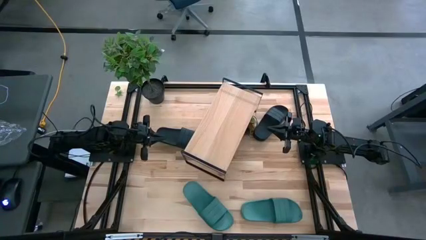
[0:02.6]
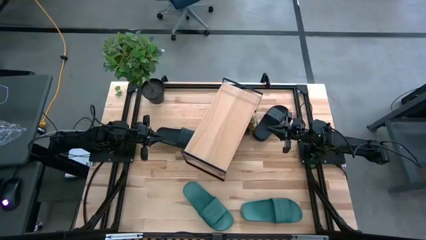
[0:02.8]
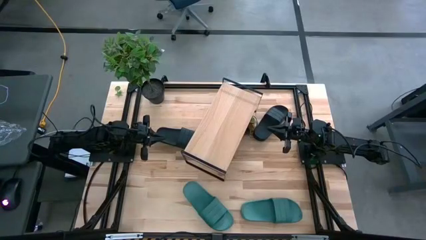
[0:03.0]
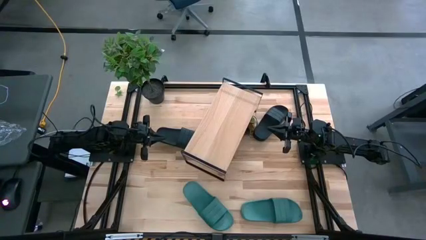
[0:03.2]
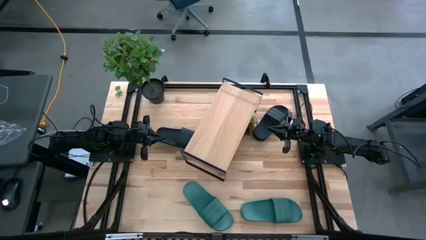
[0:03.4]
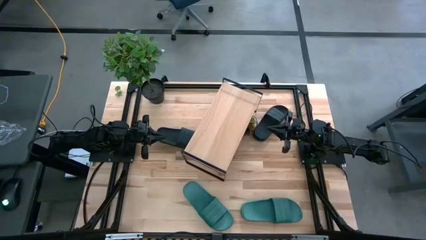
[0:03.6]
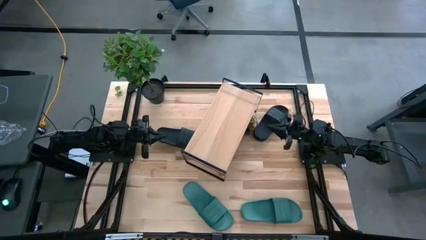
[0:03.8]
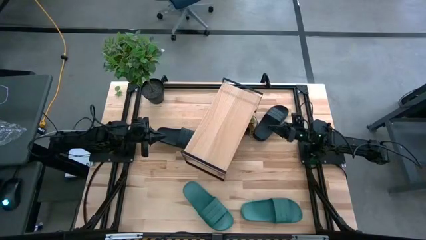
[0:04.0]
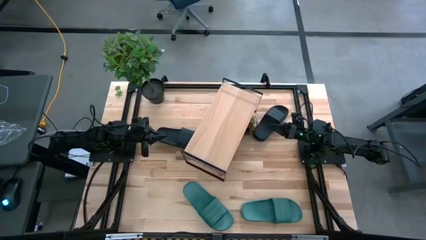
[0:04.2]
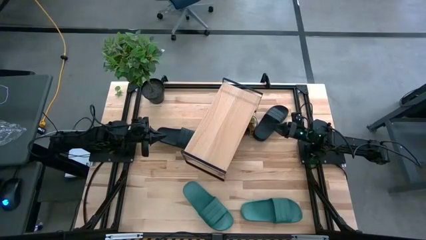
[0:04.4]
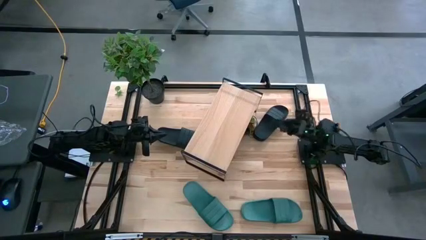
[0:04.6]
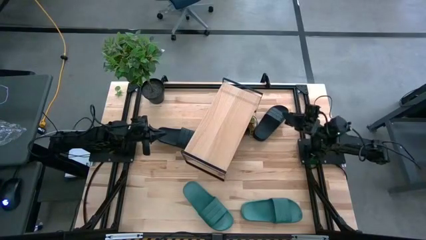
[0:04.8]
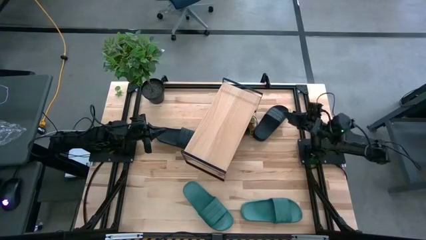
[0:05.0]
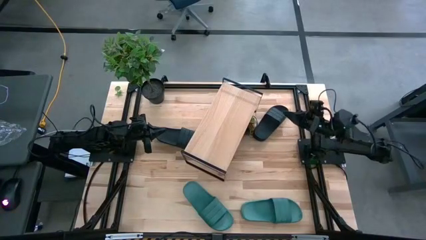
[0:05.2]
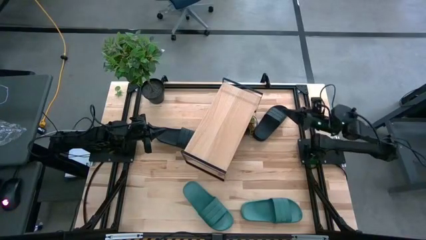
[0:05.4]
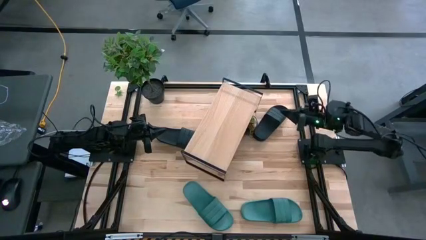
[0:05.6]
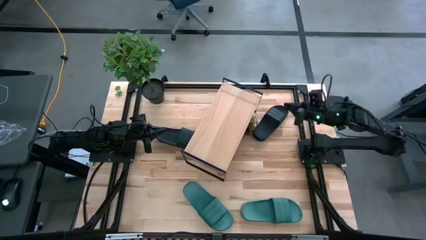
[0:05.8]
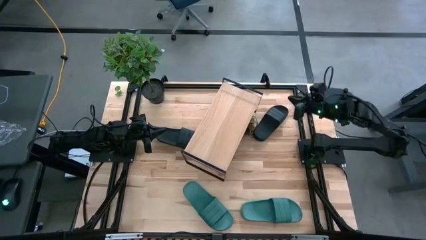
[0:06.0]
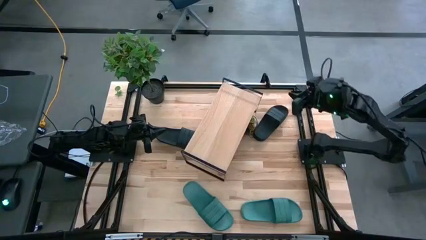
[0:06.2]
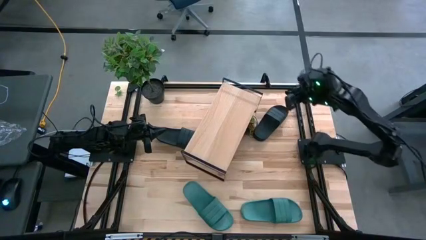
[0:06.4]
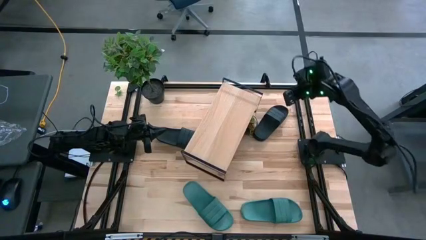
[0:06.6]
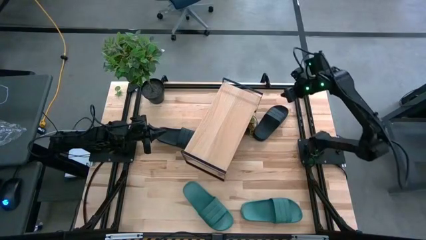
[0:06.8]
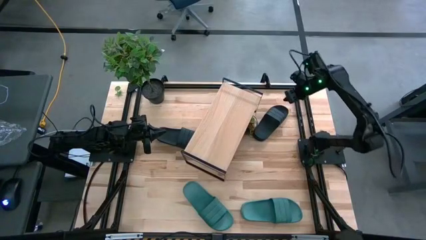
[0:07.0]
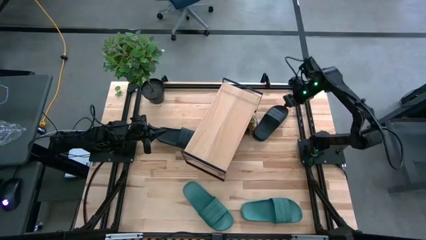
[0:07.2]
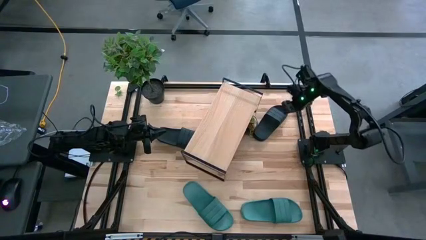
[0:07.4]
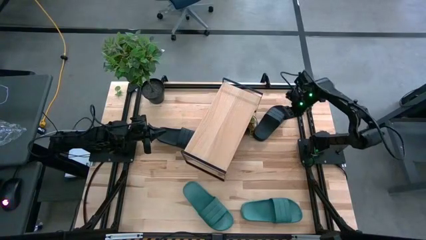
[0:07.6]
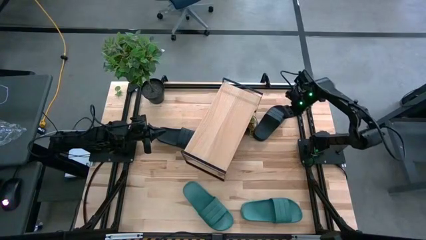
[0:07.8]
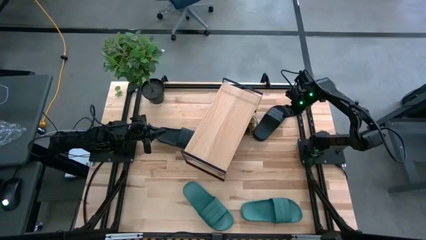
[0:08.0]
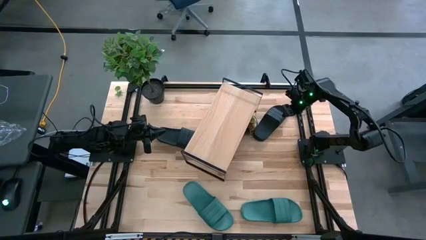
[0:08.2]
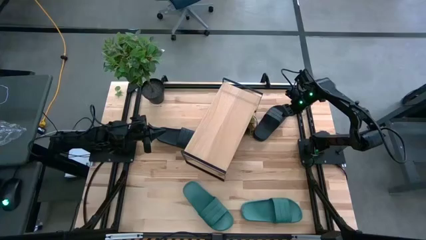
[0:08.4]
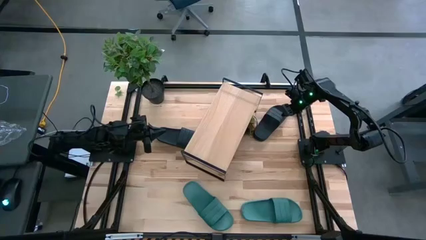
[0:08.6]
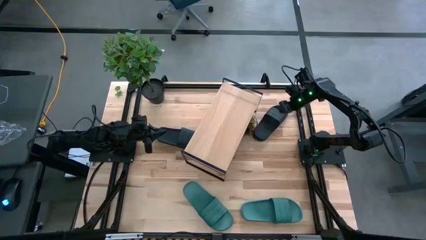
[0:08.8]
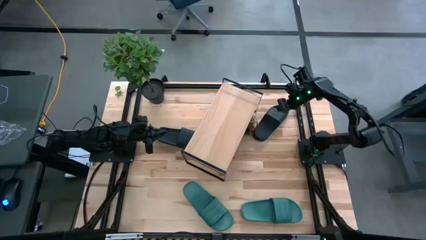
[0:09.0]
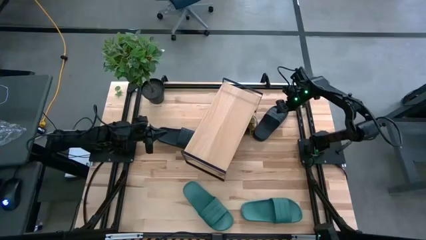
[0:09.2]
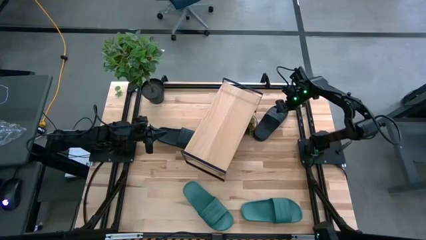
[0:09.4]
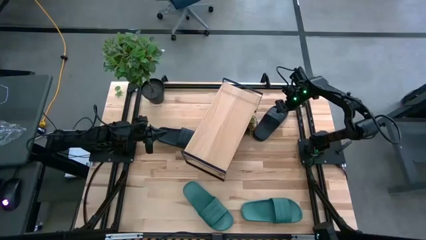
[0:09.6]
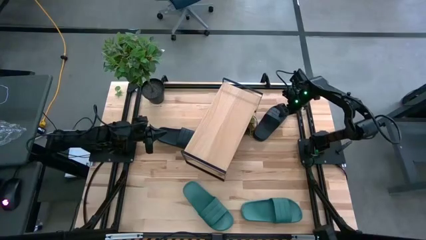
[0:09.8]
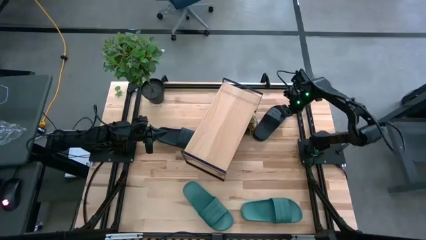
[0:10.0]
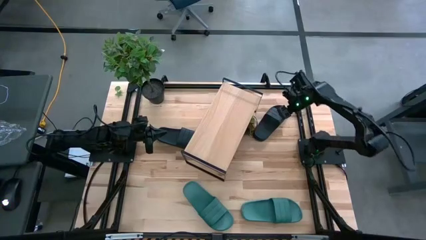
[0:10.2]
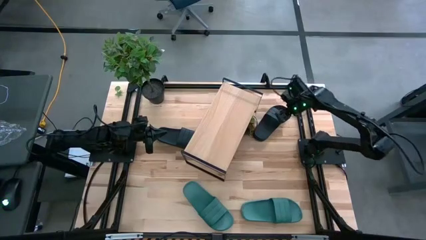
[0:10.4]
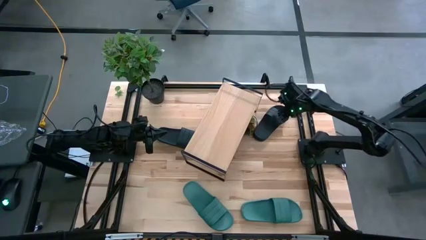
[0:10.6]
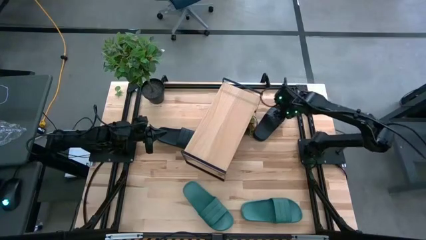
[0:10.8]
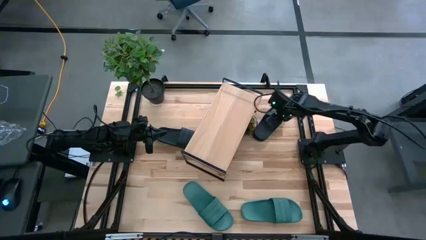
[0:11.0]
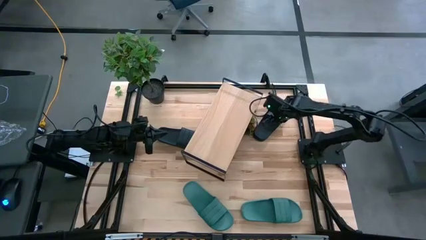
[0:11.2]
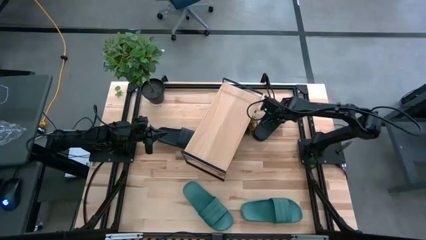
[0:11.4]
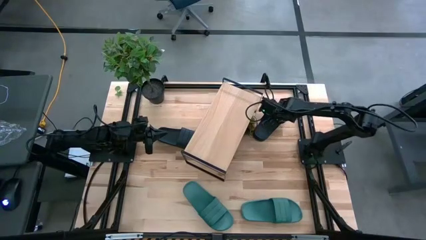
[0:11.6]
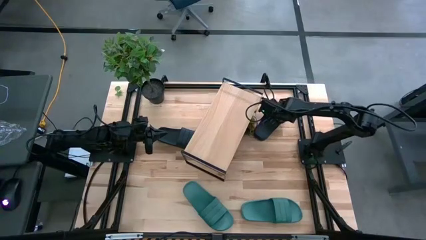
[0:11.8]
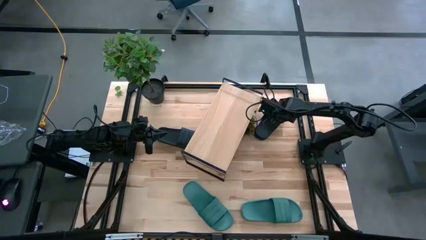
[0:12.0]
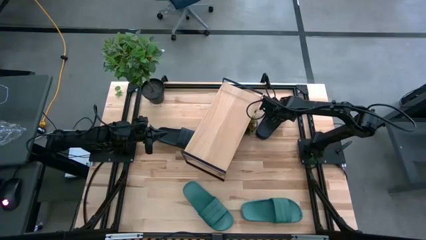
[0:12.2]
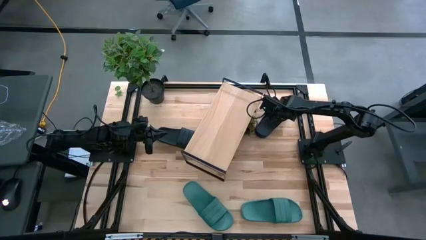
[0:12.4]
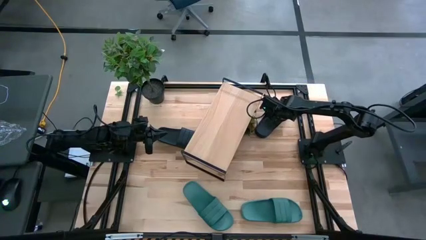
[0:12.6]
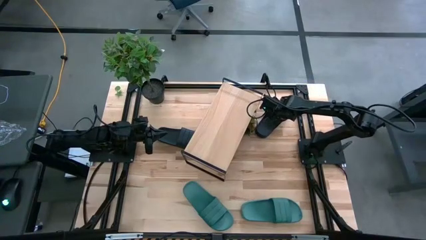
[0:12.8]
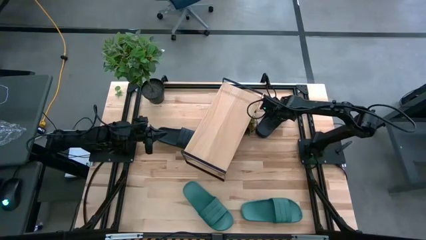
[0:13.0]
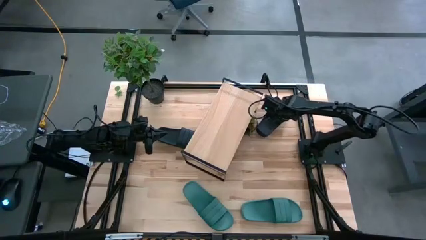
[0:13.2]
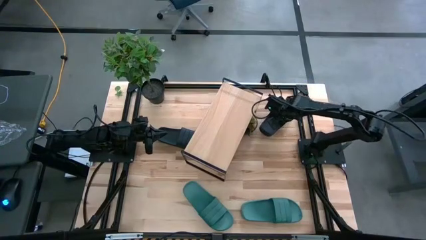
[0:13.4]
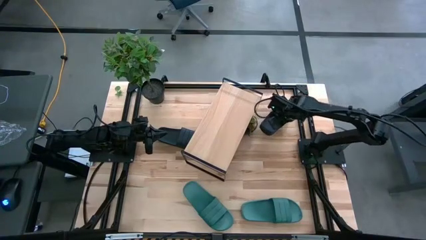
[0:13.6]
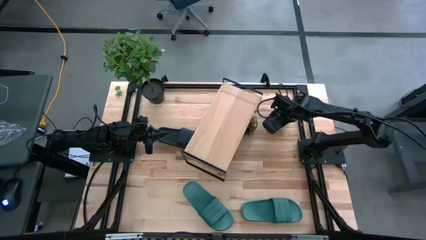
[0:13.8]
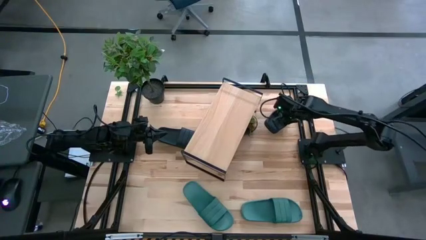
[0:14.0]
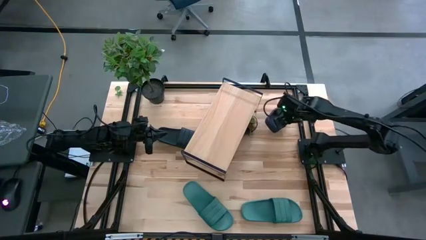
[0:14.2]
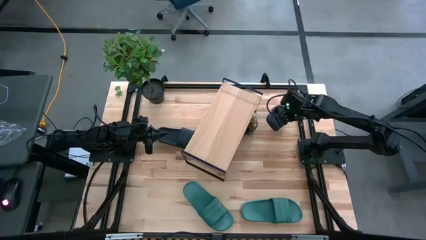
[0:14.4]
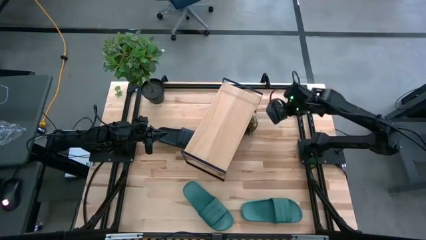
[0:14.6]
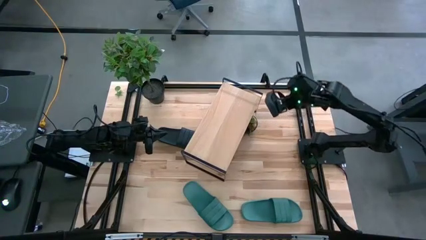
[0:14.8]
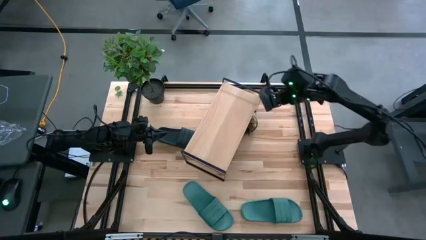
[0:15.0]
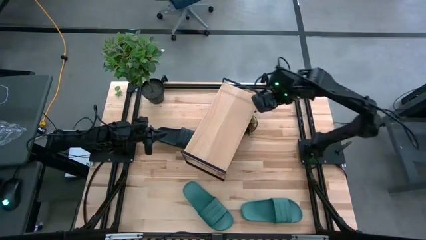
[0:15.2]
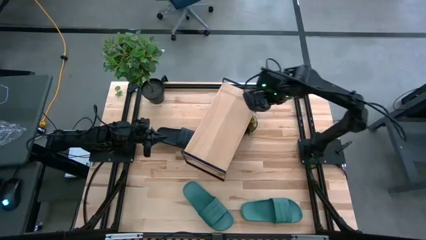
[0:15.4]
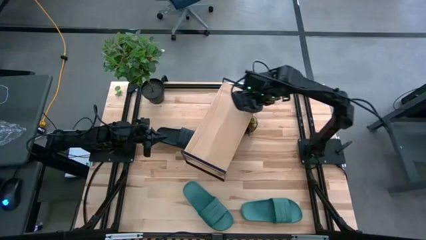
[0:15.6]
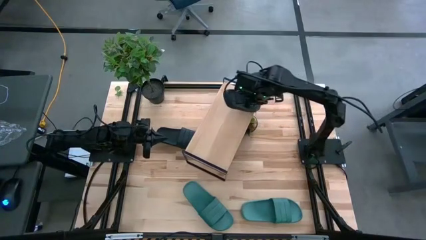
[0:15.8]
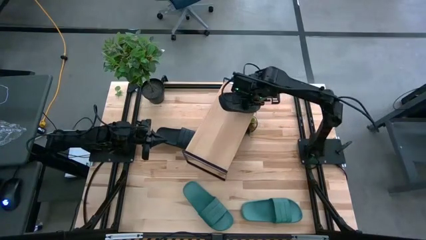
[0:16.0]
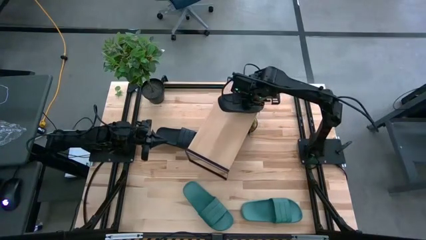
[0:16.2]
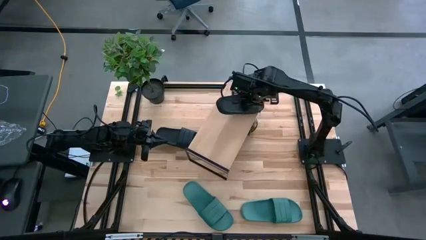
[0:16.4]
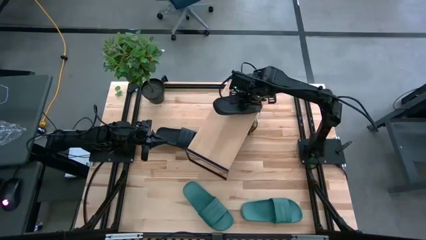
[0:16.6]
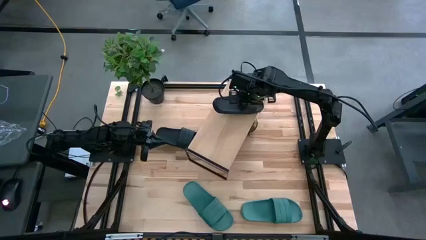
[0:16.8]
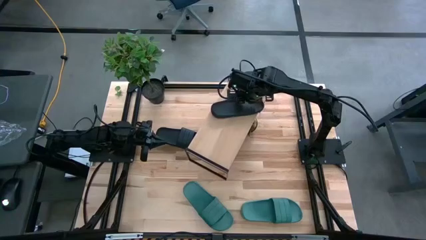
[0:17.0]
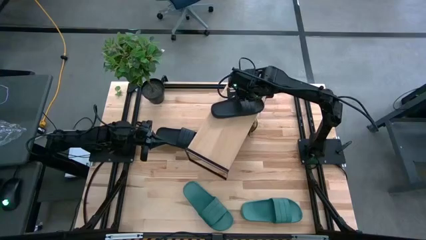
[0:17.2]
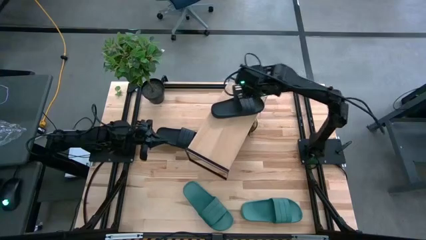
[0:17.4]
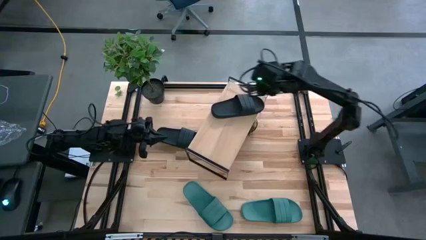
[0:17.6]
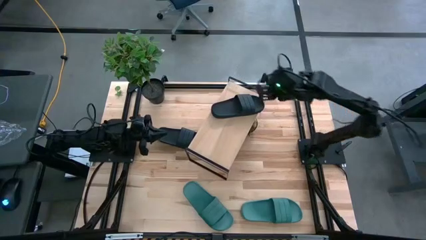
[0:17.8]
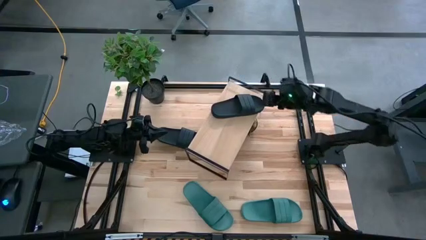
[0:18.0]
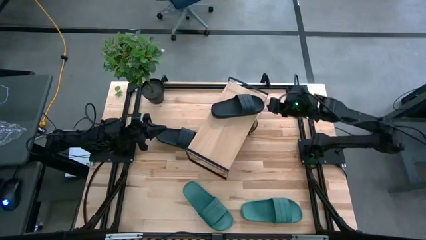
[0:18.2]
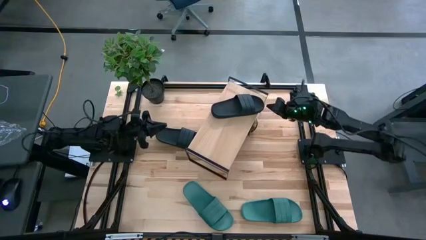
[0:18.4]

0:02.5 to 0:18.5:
Task: Pick and place slides into the shelf
Put the right black slipper on the shelf
